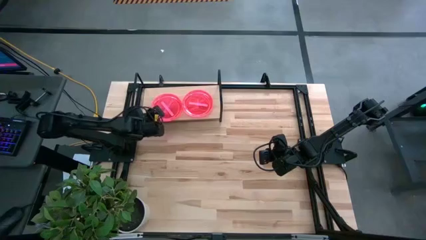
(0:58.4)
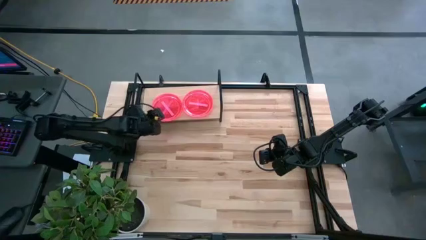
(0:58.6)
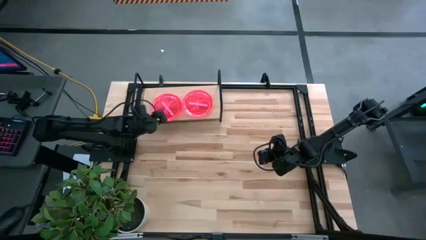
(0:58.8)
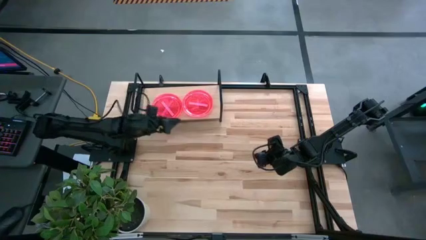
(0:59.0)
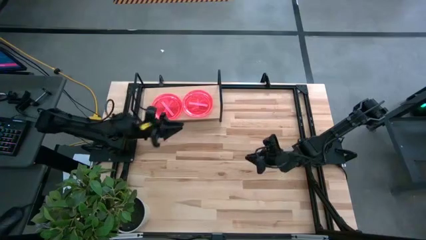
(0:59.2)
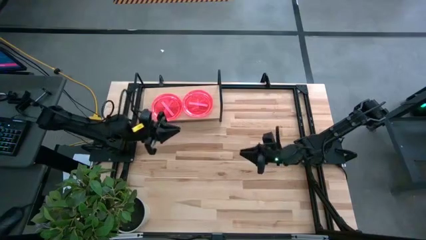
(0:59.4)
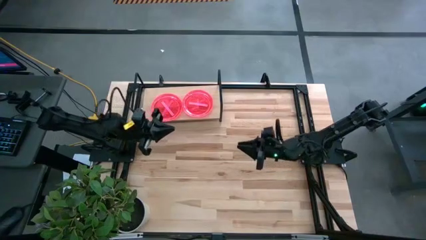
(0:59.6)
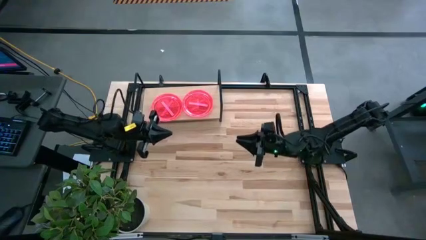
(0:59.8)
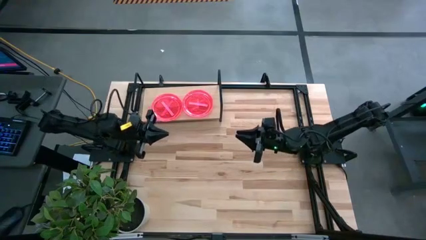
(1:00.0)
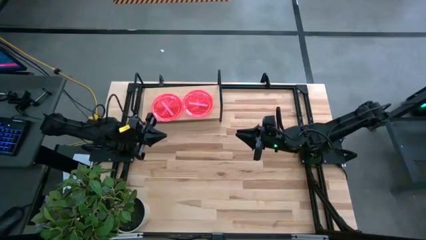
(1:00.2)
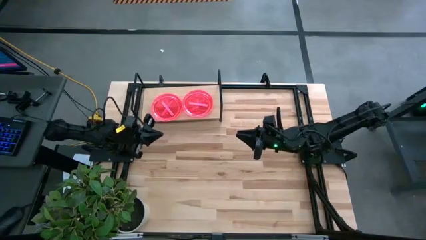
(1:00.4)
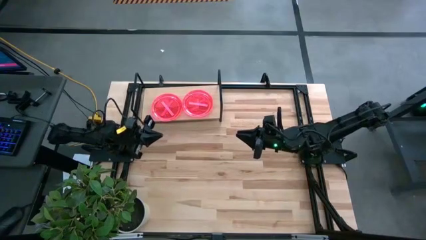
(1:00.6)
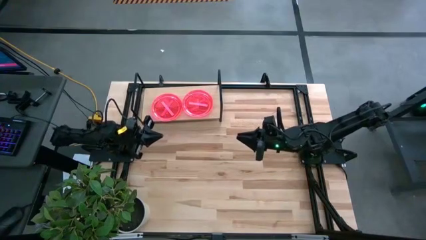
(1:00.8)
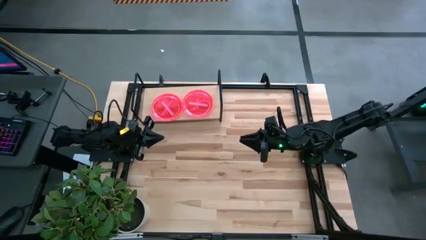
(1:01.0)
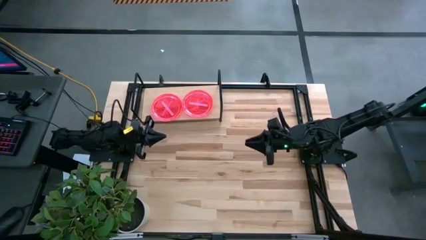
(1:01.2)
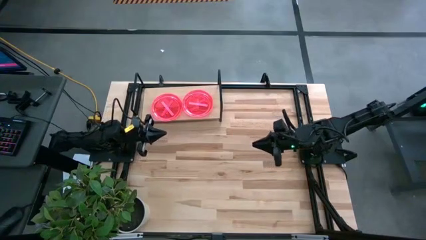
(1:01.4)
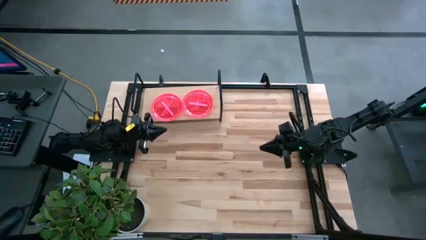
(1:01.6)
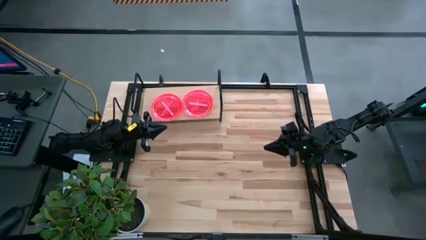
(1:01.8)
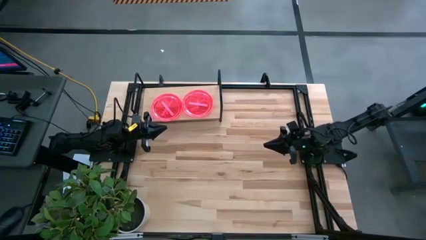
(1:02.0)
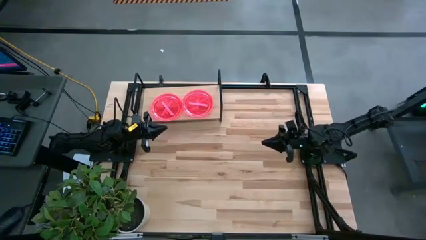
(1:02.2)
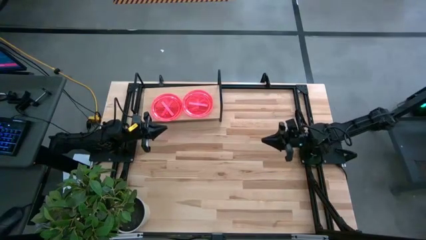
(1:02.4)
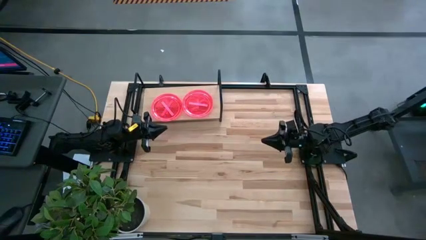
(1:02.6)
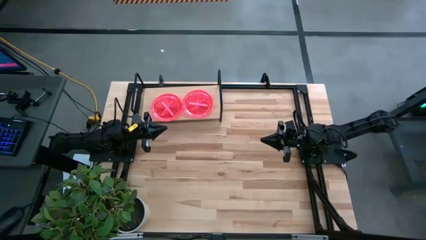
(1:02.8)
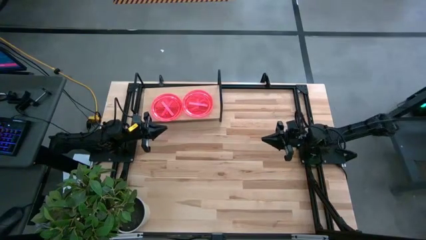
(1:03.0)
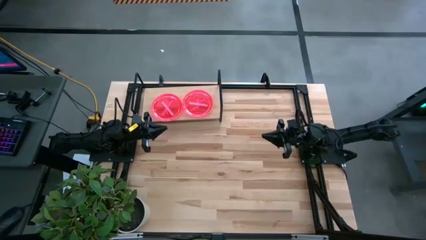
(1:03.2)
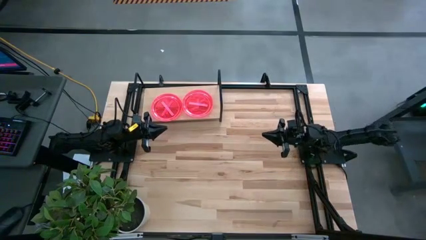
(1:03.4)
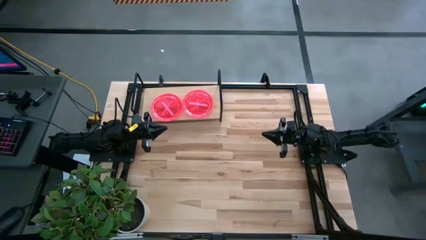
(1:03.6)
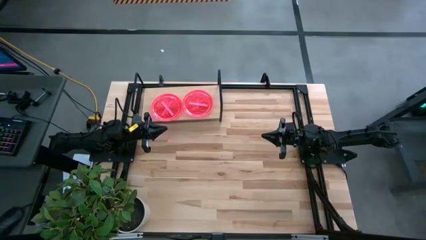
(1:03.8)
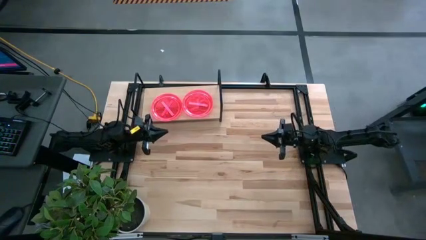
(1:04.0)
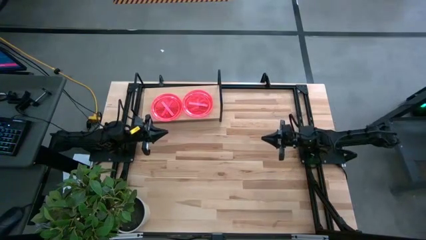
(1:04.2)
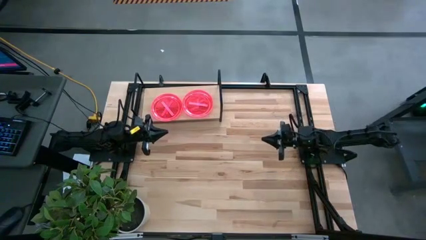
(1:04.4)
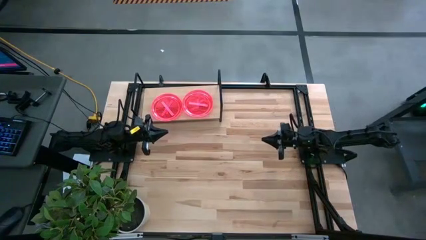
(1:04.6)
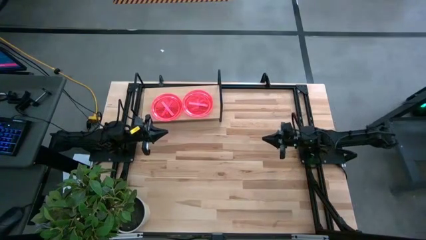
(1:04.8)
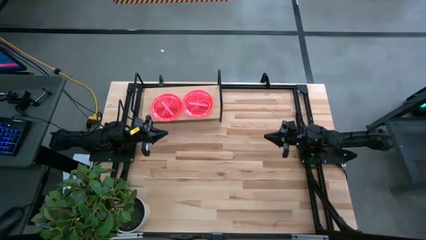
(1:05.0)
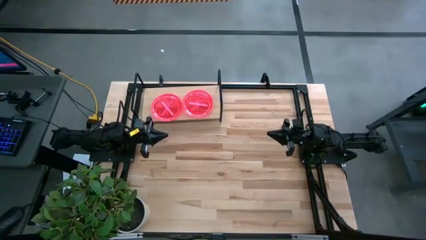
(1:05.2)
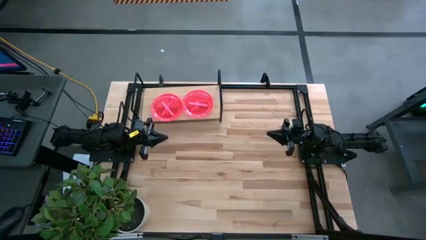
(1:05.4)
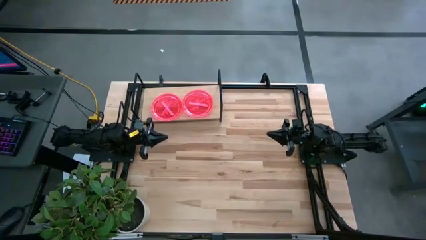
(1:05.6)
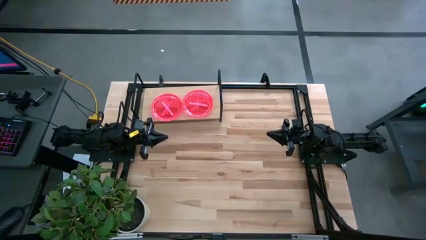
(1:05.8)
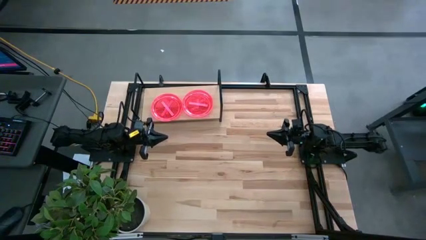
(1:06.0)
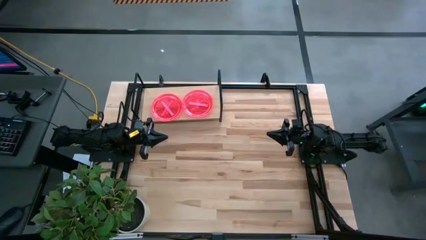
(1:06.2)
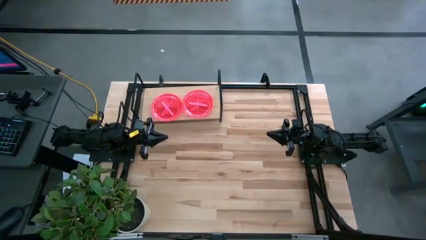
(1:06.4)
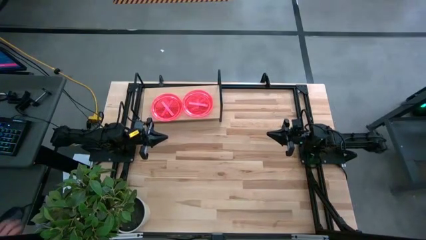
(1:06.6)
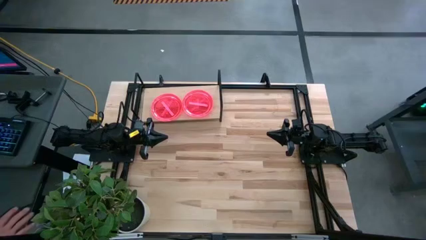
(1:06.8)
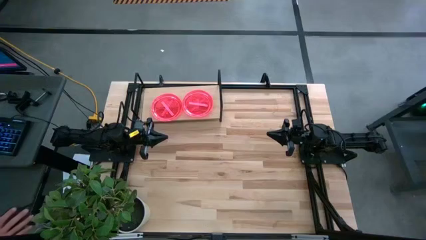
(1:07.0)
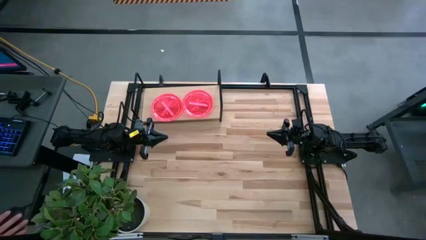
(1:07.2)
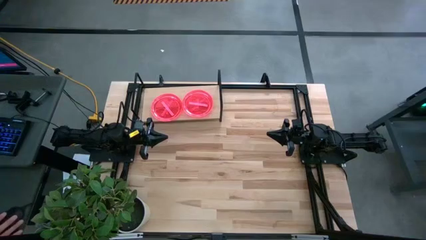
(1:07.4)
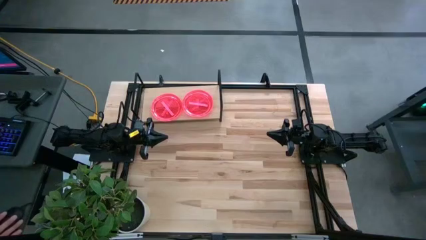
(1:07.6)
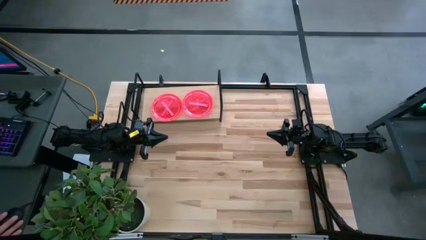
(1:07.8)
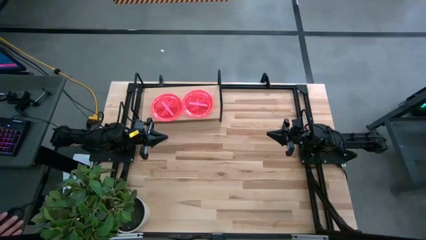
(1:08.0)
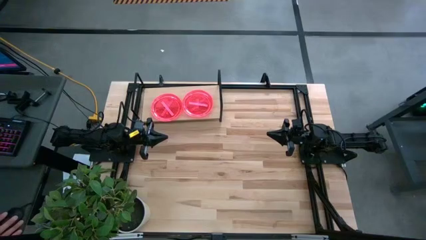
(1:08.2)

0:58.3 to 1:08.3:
Task: Place and stack plates onto a shelf
Return to Home Position

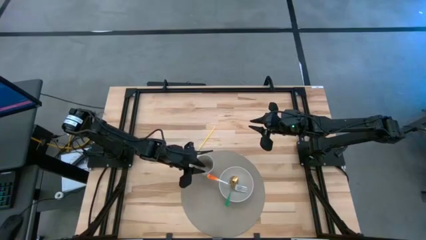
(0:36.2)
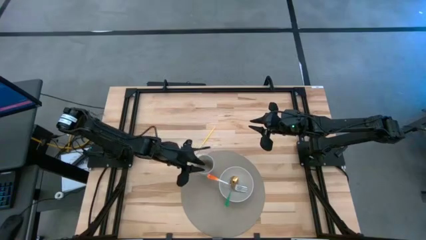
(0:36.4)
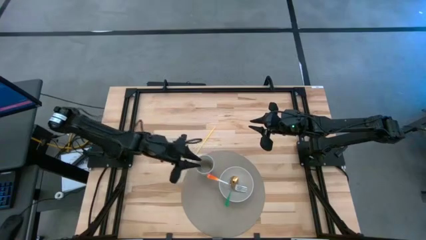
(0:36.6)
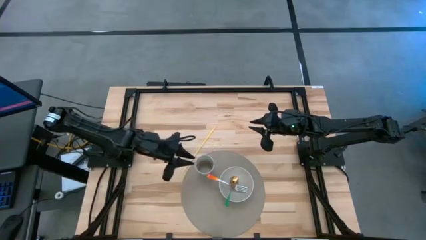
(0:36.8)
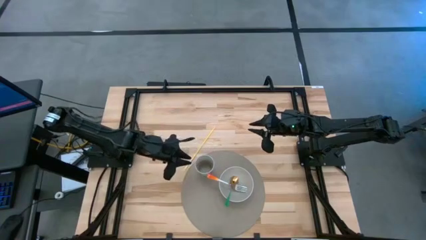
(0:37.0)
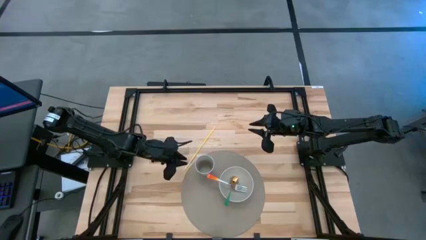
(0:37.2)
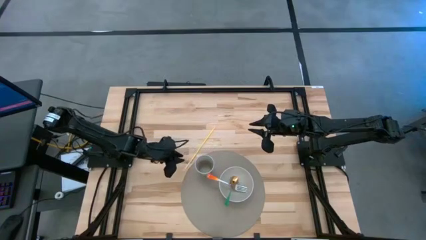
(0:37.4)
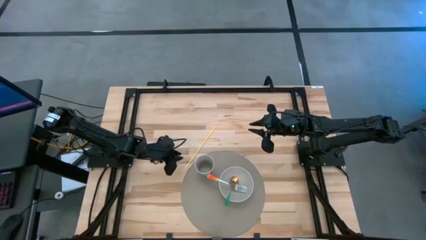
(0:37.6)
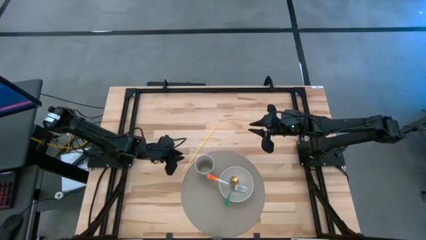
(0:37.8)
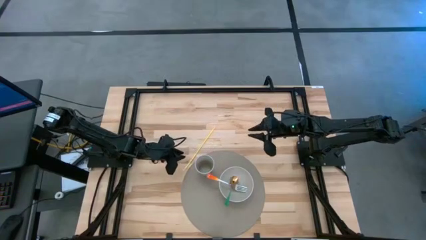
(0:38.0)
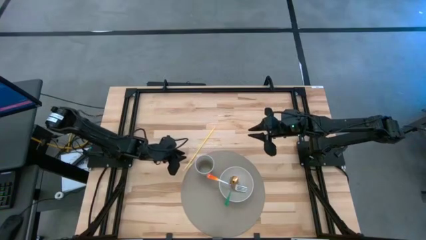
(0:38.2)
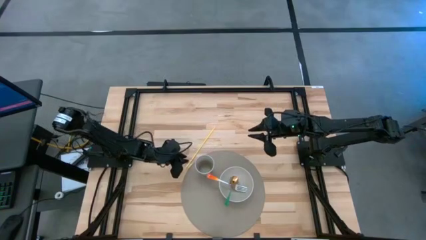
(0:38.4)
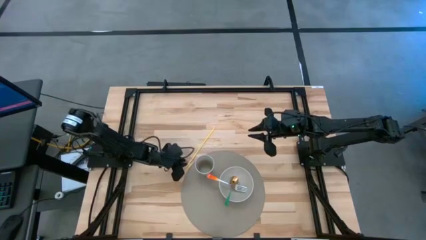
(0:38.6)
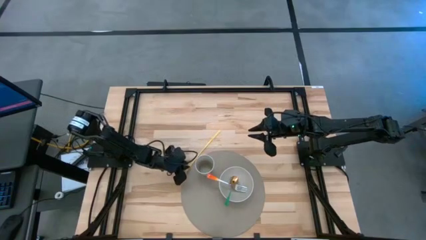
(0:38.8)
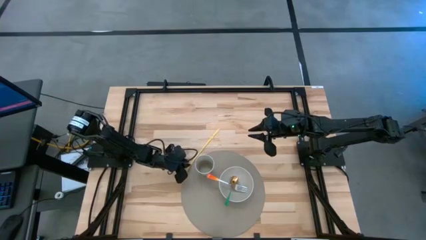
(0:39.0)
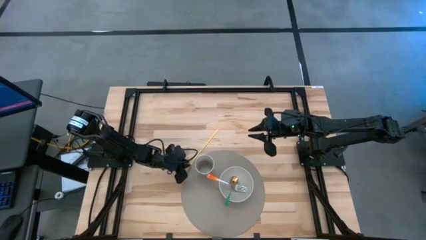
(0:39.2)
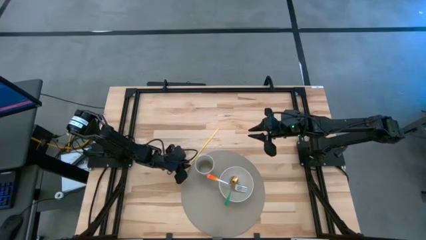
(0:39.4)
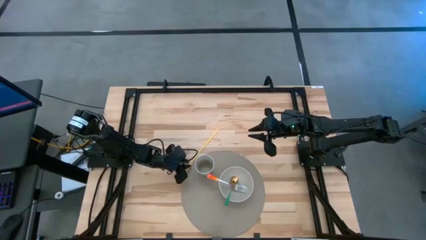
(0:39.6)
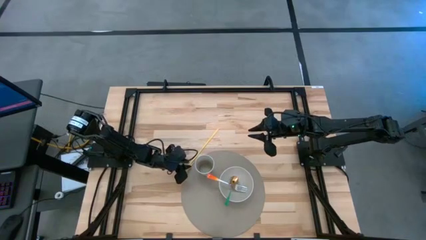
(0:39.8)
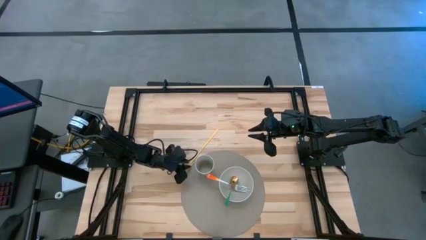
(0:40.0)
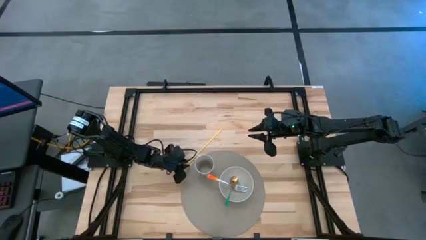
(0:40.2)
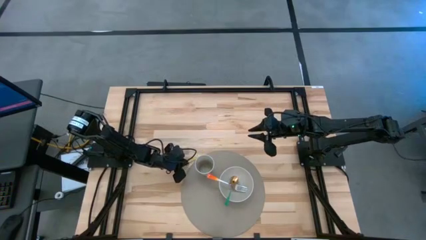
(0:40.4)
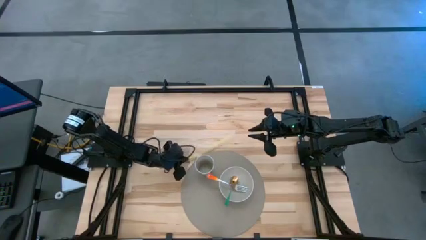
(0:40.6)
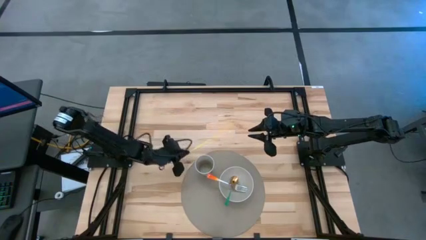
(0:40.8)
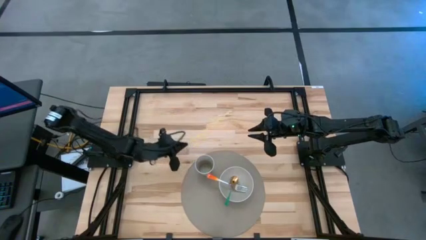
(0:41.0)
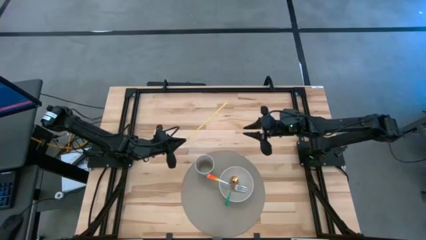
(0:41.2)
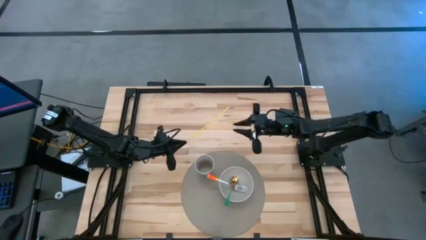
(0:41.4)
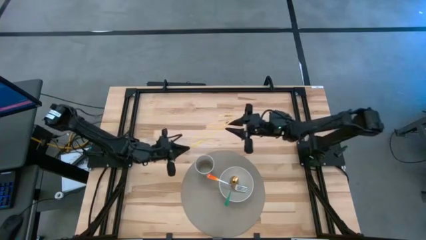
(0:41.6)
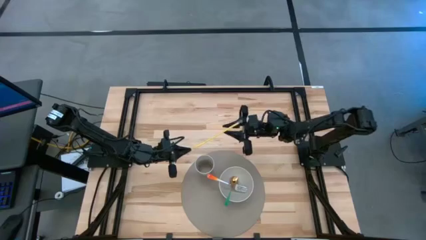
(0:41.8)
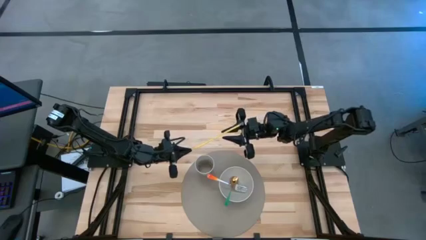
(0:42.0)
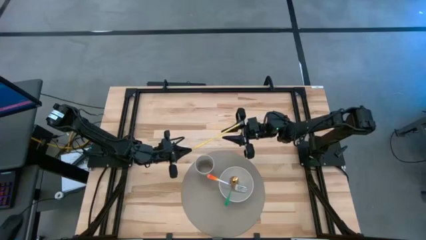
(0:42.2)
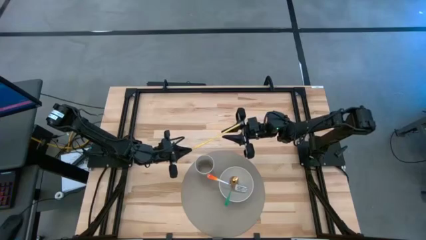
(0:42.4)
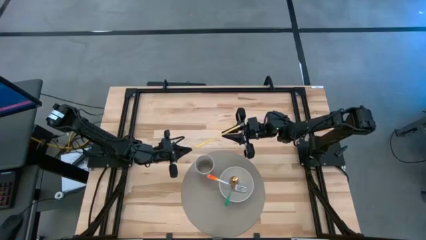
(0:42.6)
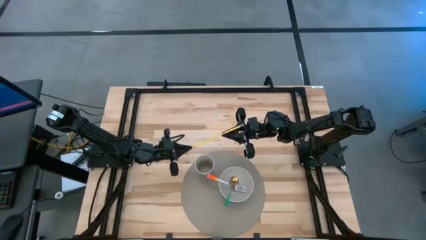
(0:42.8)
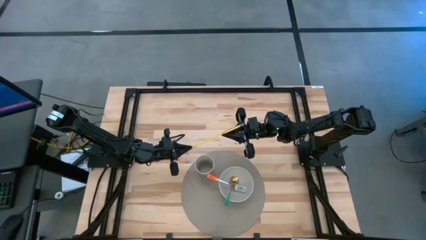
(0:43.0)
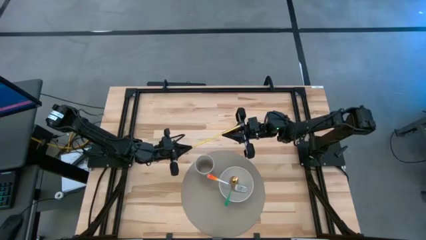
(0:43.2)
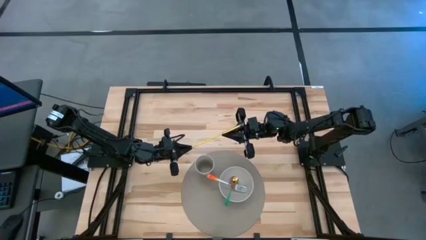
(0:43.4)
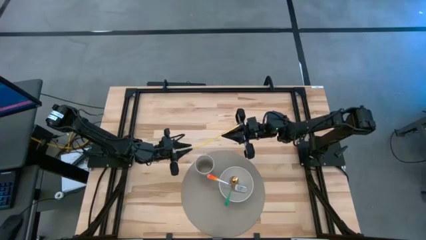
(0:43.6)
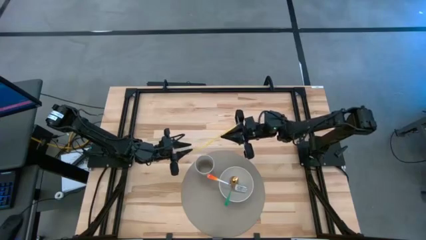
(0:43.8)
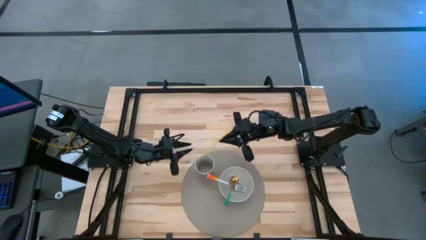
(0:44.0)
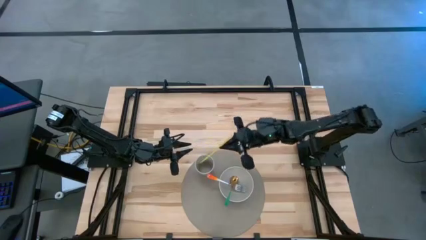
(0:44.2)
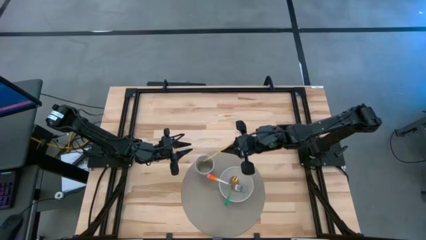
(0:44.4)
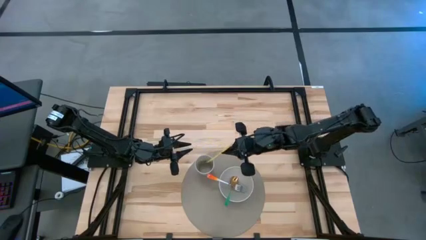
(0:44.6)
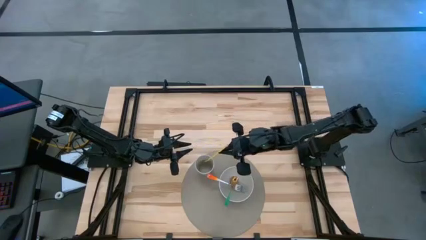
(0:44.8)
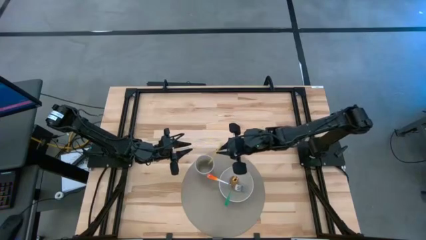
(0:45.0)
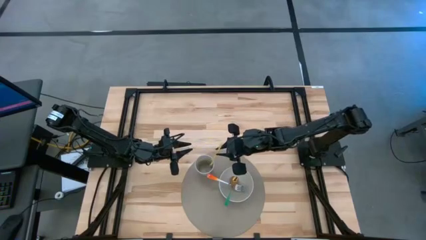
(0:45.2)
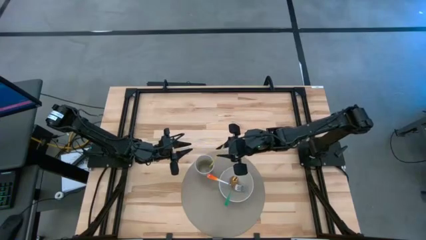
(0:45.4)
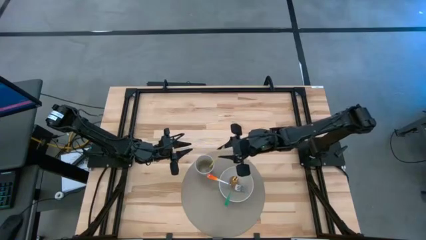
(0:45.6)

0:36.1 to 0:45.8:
Task: Pick & Place Utensil
Put the yellow straw into the white cup on the placemat
